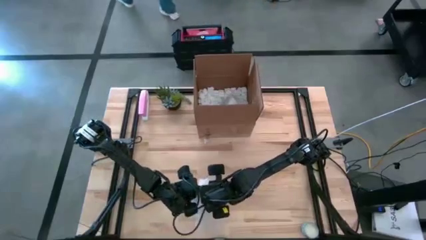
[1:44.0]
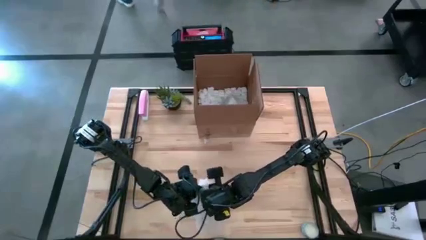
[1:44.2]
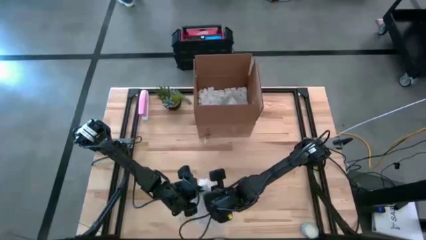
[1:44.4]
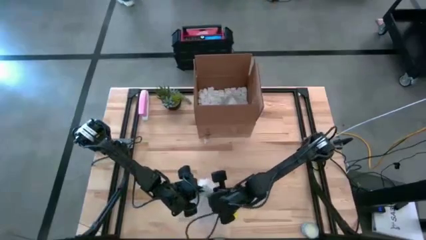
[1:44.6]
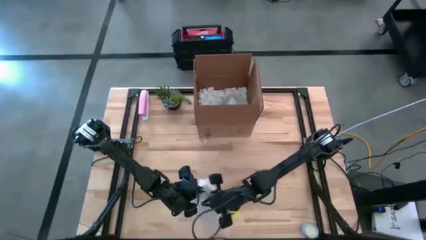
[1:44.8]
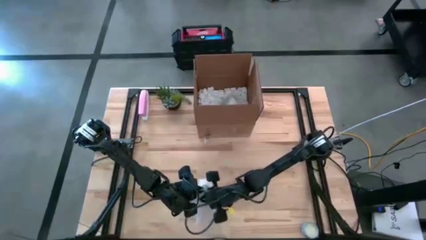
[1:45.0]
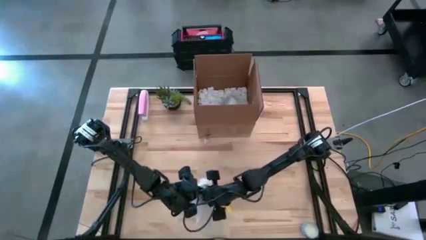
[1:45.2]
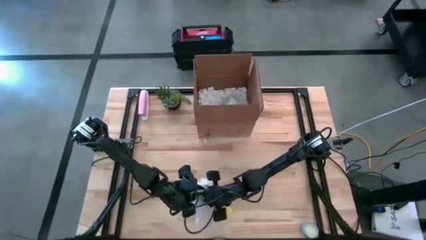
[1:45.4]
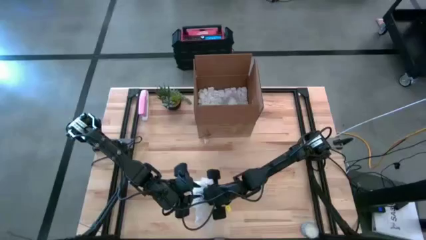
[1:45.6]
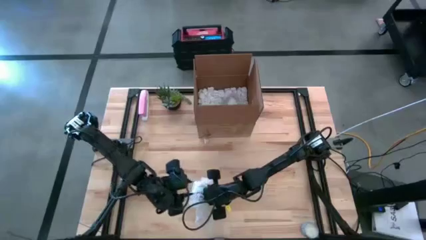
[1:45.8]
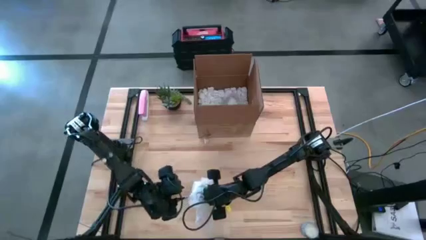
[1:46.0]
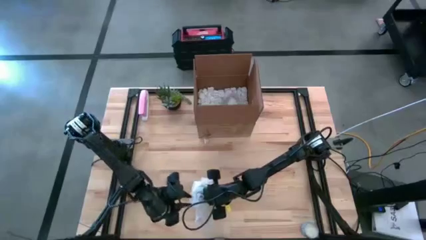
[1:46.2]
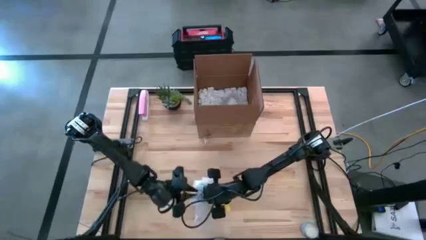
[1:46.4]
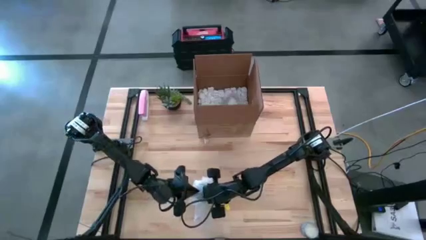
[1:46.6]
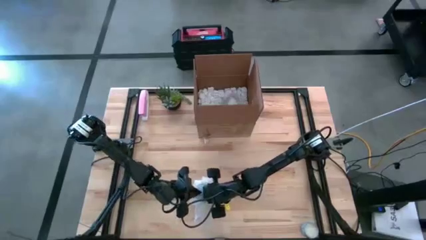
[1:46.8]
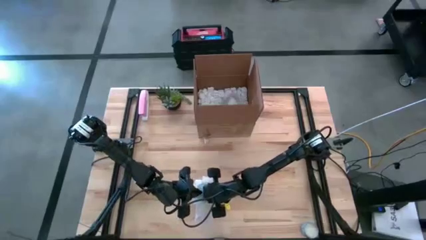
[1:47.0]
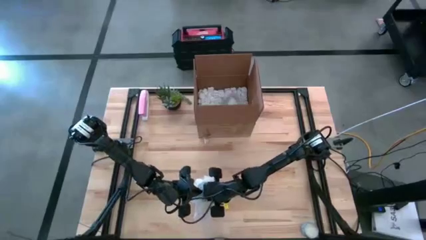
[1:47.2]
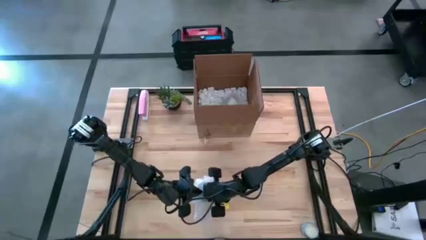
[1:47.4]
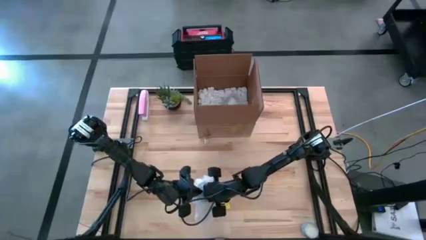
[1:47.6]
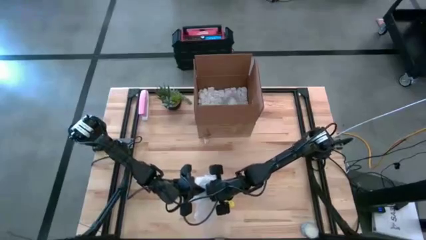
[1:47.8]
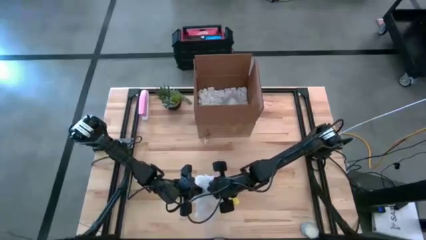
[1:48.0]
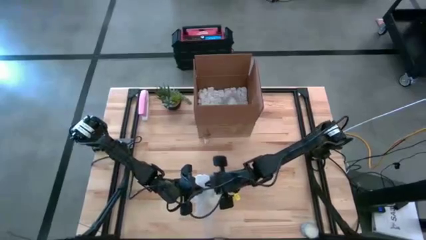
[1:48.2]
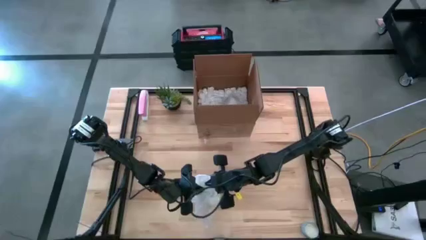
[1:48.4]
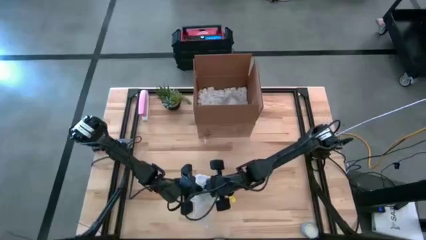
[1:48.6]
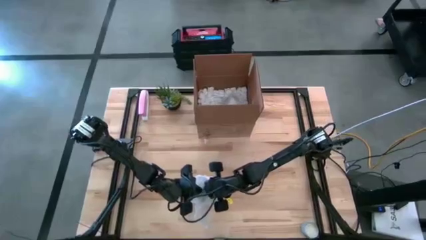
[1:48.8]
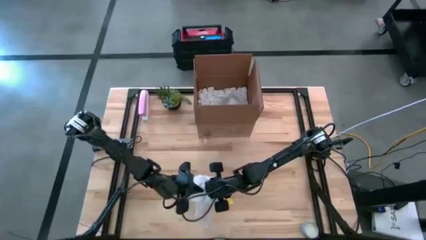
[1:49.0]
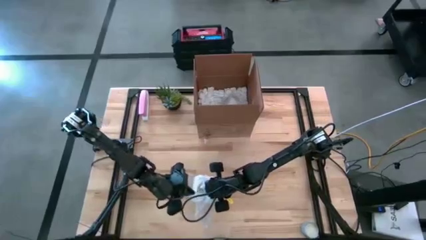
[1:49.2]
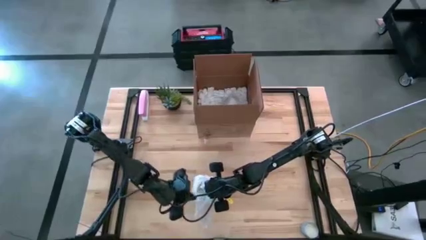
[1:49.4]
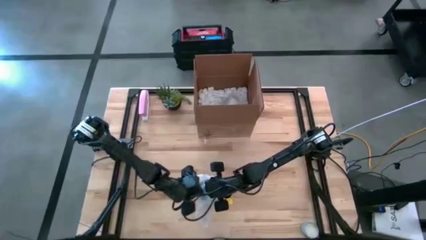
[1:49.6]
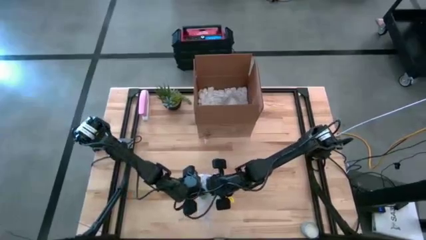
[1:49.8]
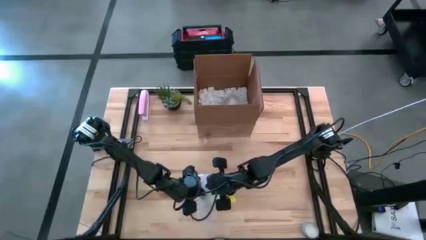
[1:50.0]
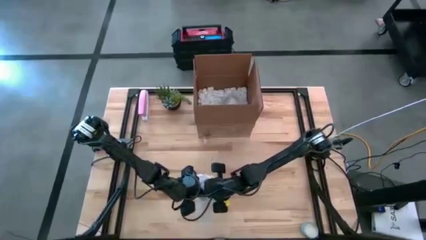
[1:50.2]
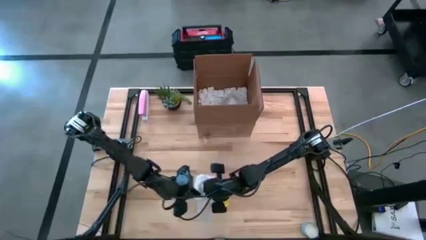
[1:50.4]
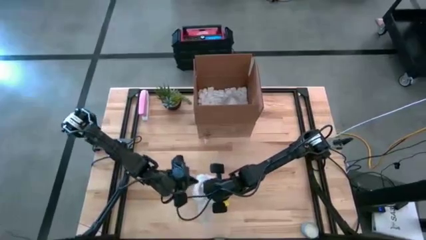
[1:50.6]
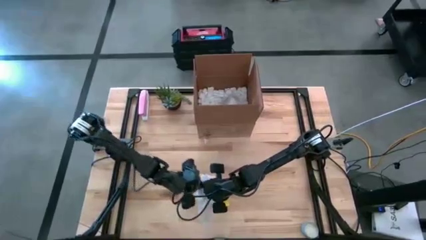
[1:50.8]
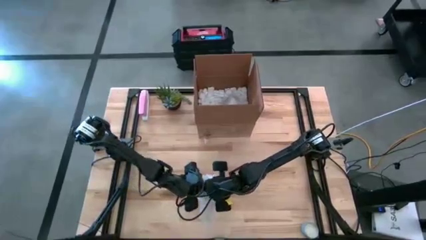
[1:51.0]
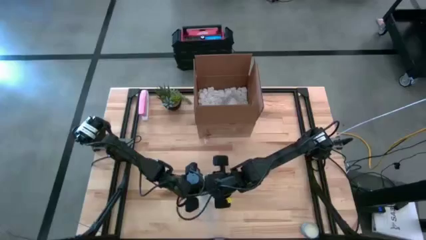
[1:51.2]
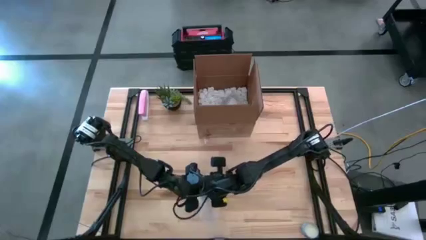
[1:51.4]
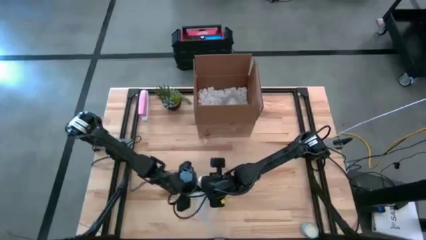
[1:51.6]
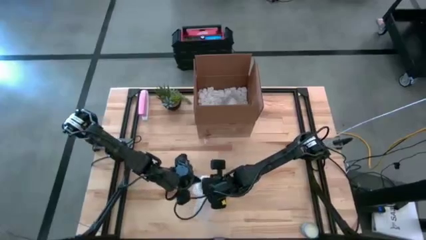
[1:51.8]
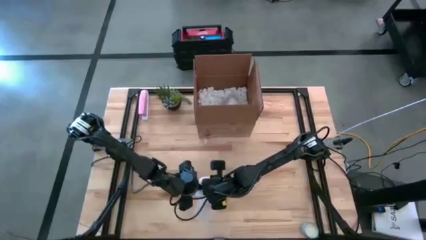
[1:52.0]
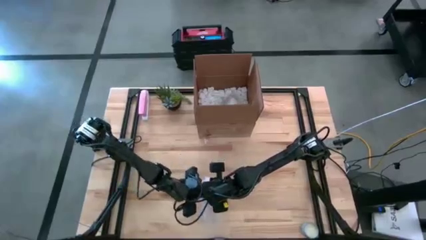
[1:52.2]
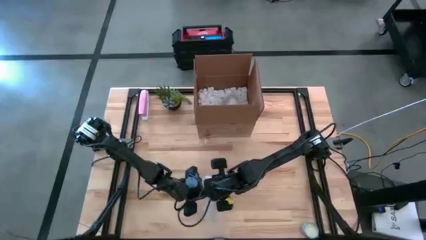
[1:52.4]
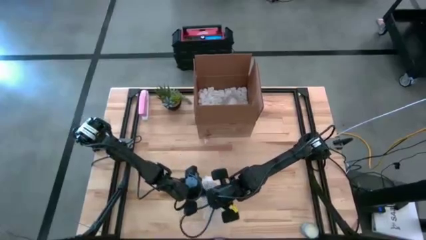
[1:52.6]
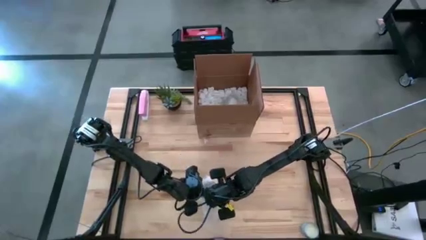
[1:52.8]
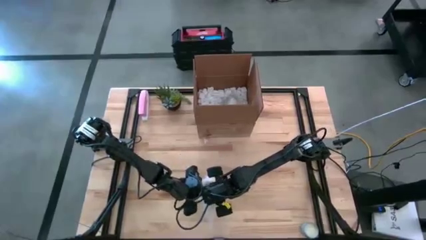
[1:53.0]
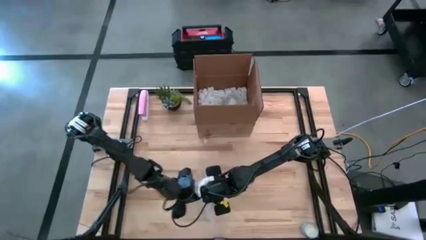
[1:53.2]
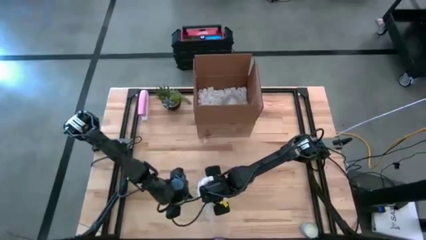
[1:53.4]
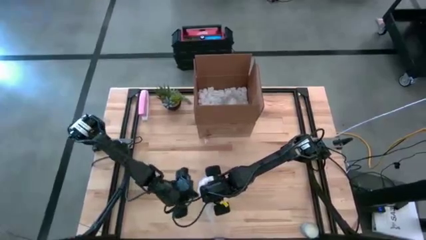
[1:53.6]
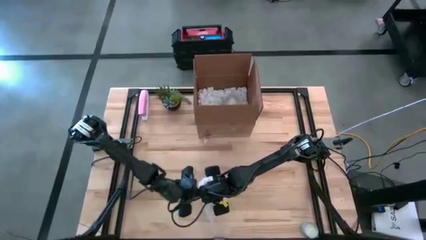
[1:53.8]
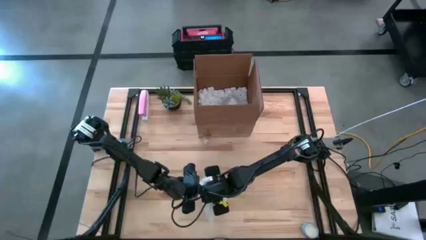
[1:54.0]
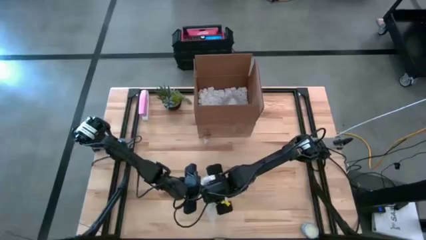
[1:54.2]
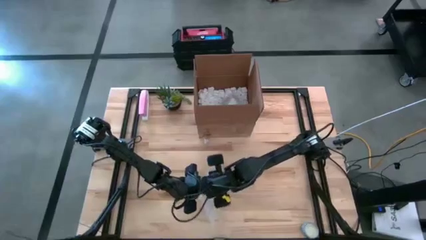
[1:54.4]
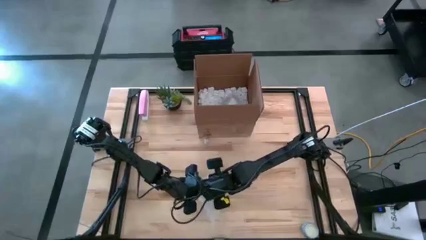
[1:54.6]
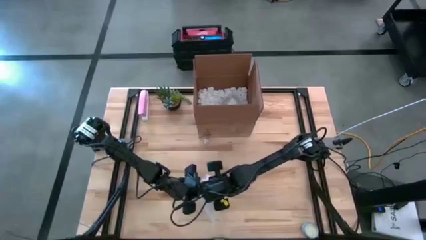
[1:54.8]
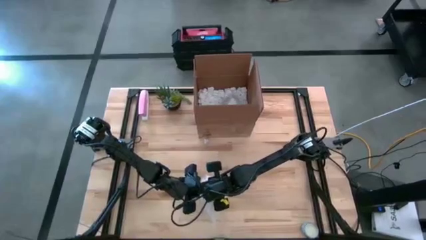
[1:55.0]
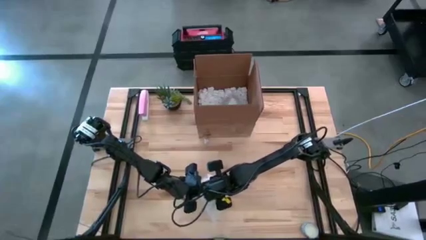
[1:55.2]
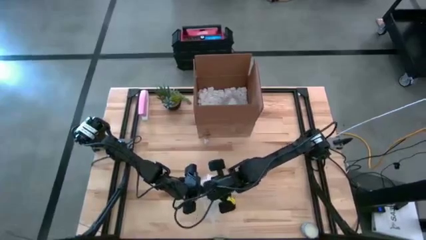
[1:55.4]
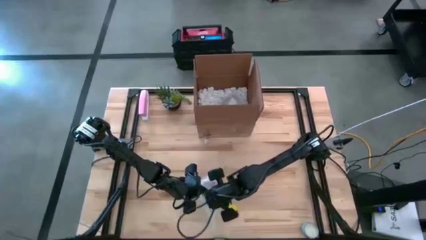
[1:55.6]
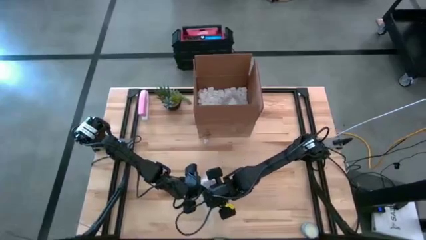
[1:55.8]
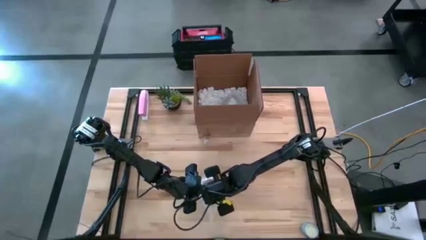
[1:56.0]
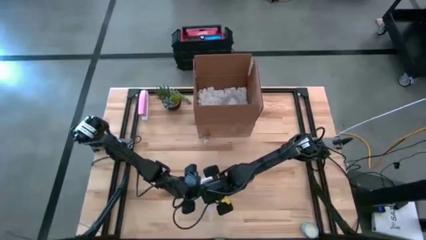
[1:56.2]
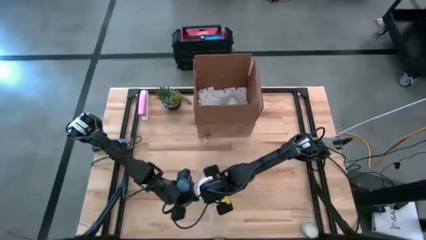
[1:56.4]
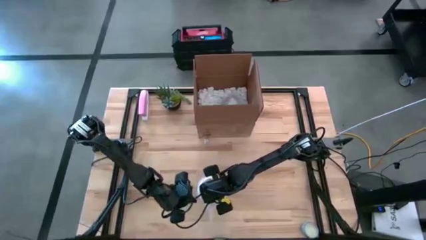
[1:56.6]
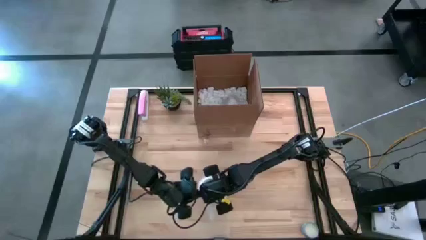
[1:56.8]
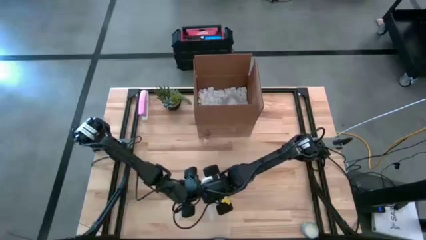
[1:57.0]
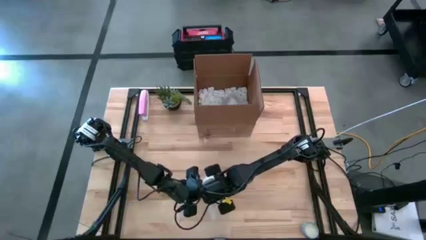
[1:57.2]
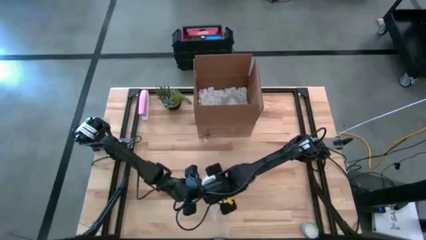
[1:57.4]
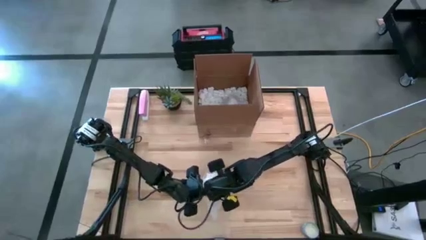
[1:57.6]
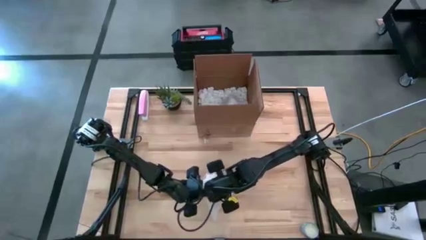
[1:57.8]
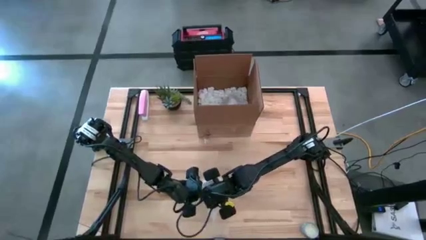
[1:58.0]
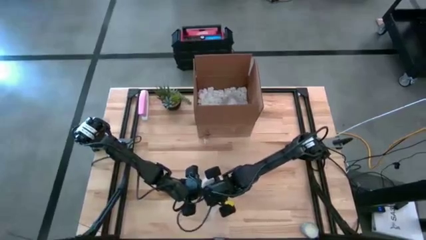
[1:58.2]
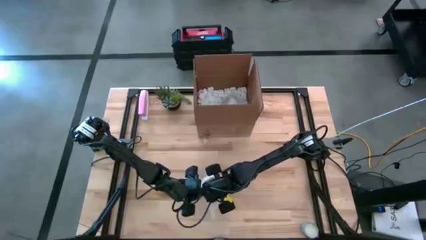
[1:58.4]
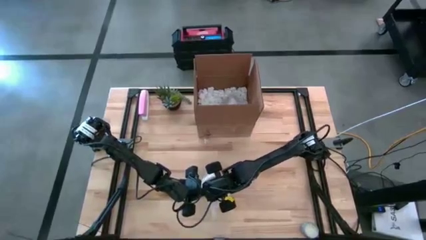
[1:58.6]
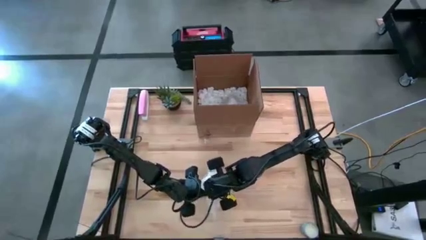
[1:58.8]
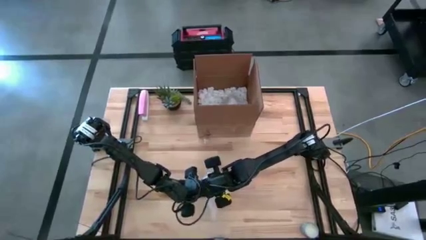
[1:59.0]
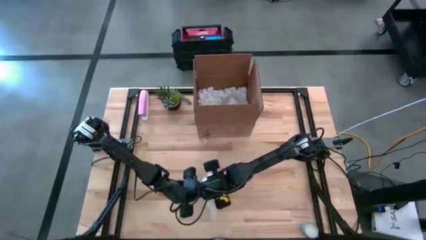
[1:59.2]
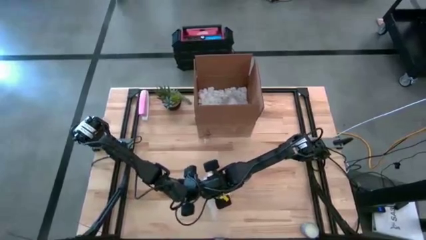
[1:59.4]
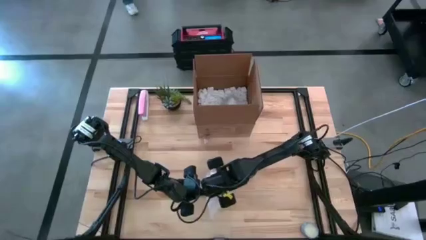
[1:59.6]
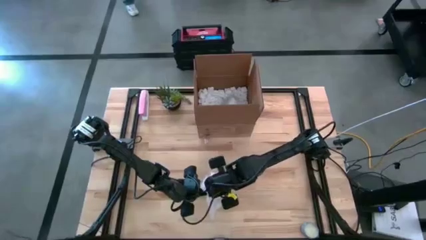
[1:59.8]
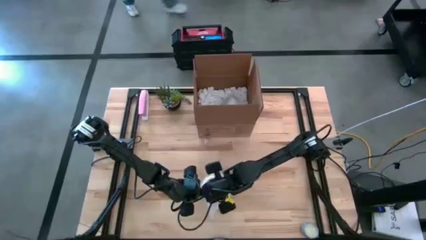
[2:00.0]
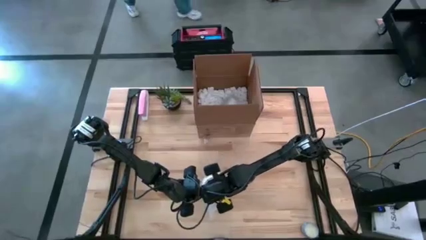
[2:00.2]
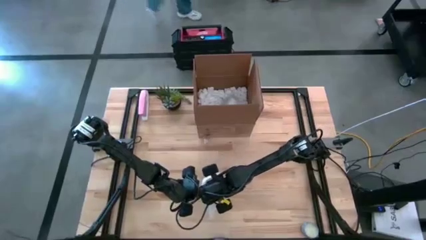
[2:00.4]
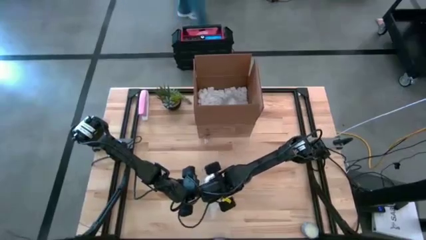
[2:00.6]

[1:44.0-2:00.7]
Task: wrap mug
Wrap the yellow mug with a bubble wrap
